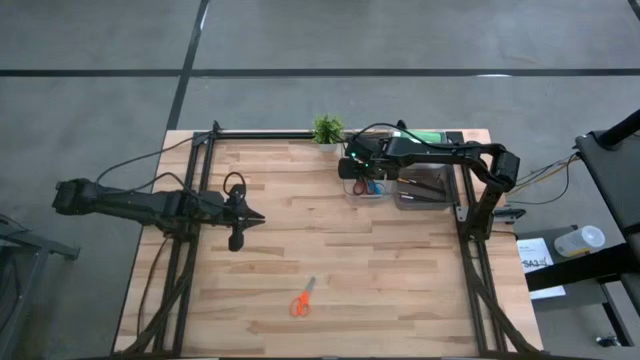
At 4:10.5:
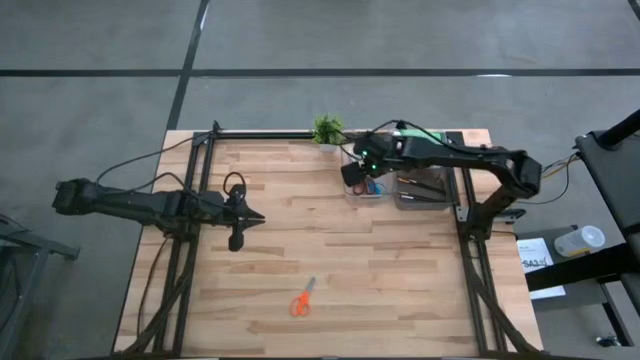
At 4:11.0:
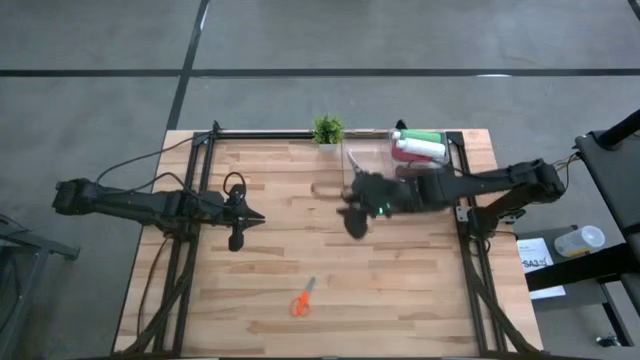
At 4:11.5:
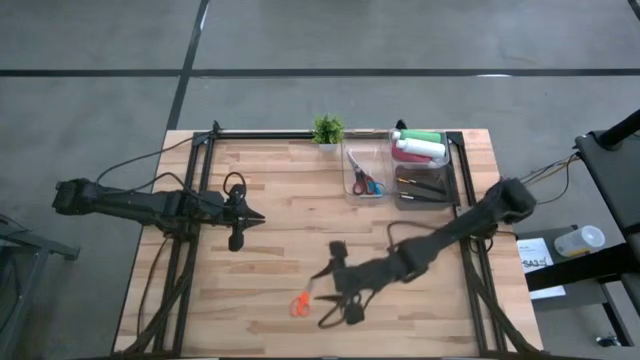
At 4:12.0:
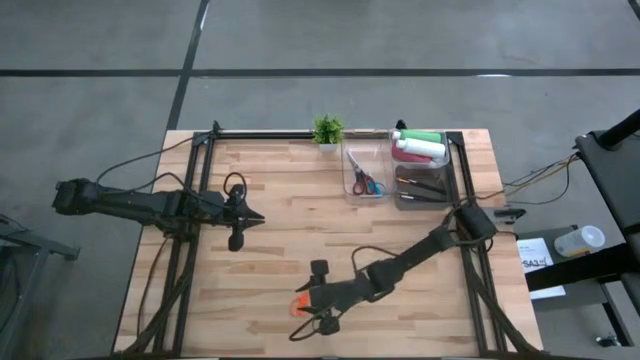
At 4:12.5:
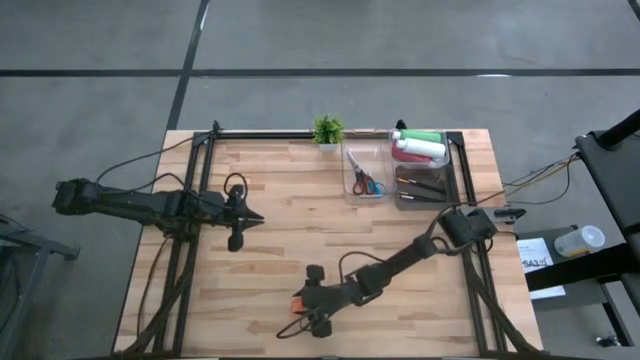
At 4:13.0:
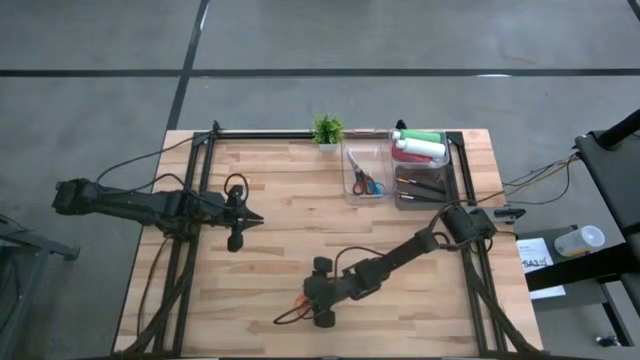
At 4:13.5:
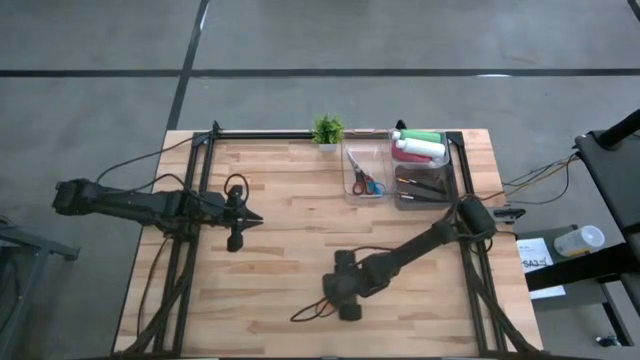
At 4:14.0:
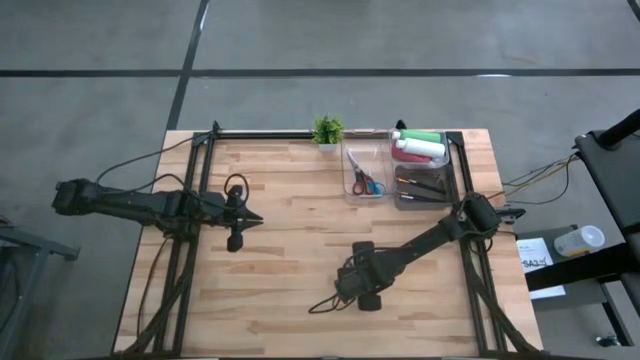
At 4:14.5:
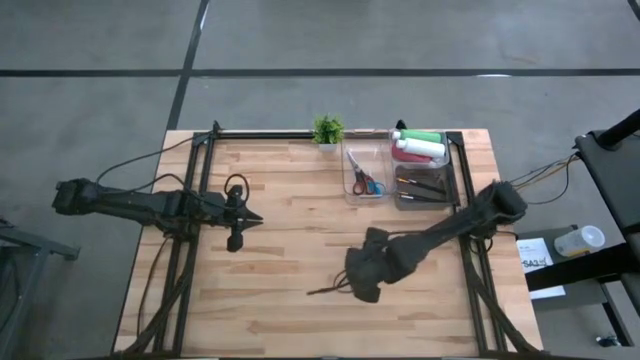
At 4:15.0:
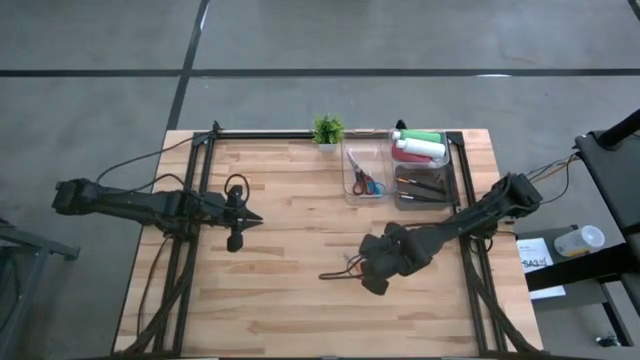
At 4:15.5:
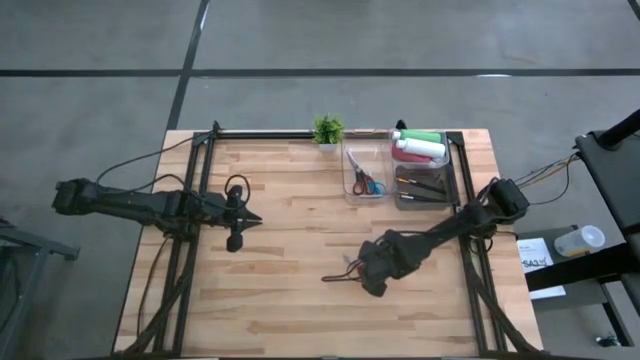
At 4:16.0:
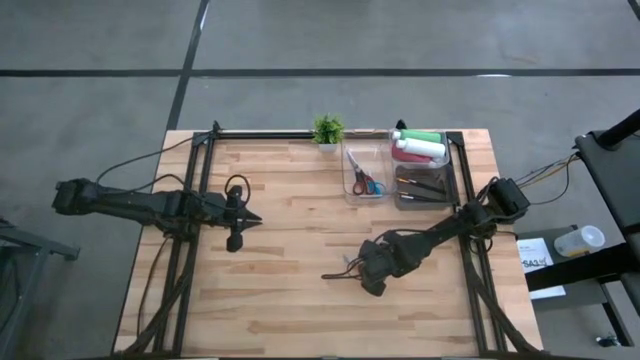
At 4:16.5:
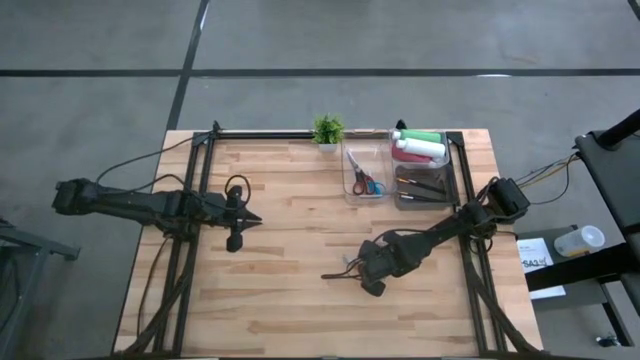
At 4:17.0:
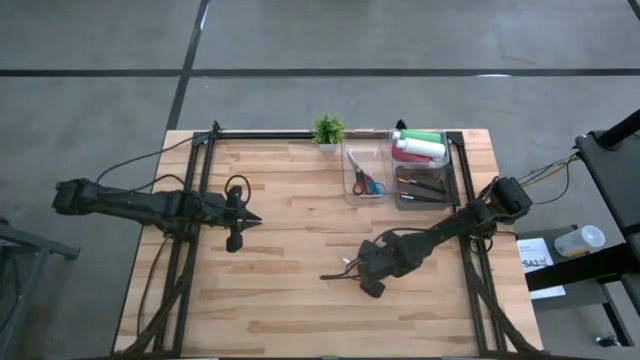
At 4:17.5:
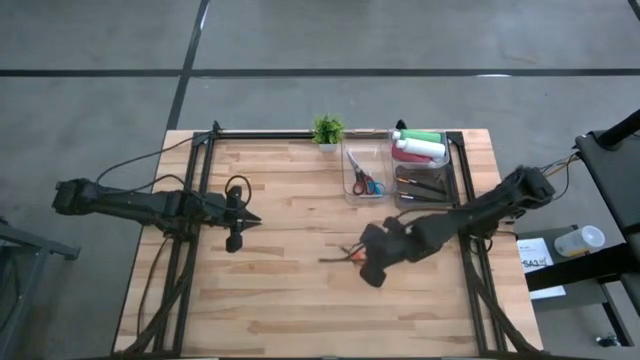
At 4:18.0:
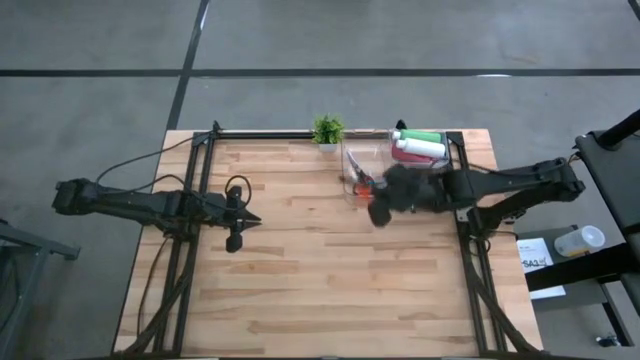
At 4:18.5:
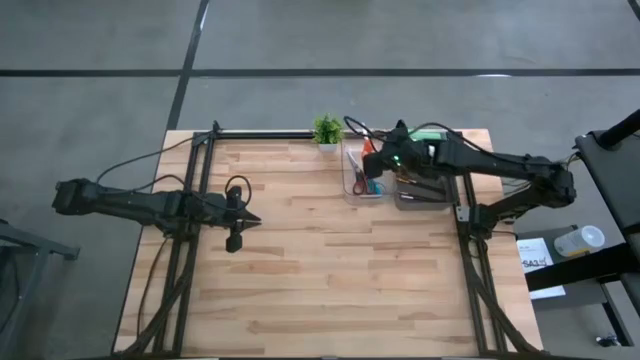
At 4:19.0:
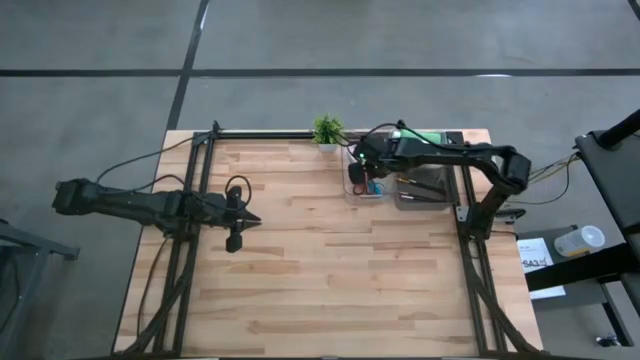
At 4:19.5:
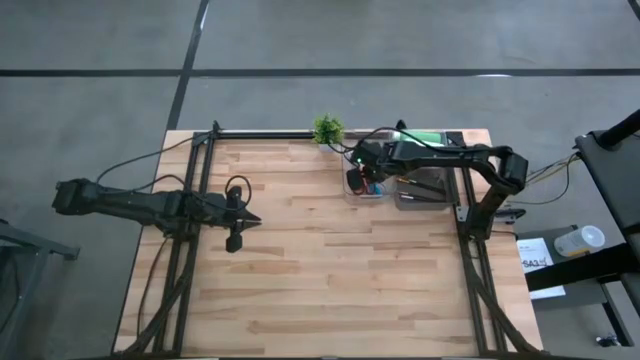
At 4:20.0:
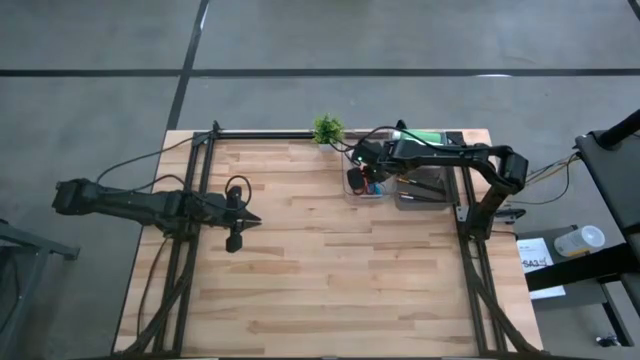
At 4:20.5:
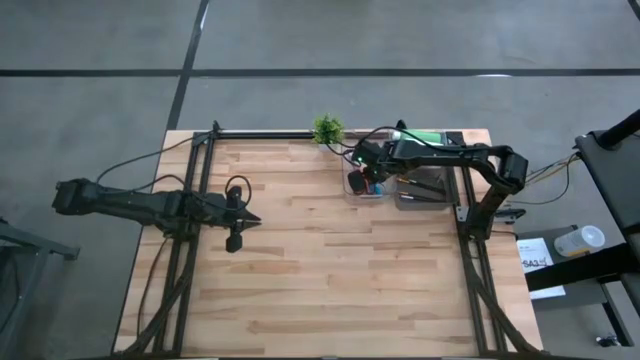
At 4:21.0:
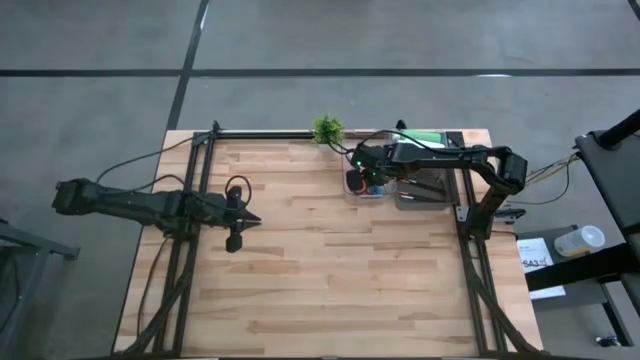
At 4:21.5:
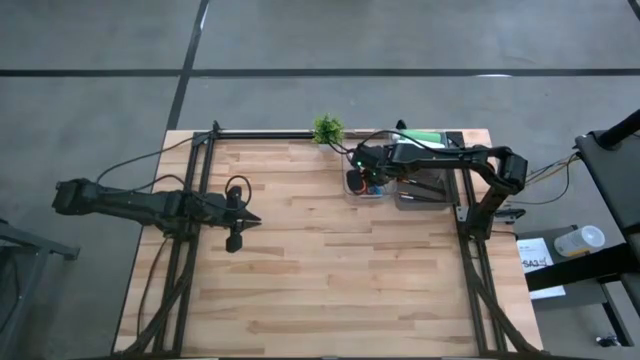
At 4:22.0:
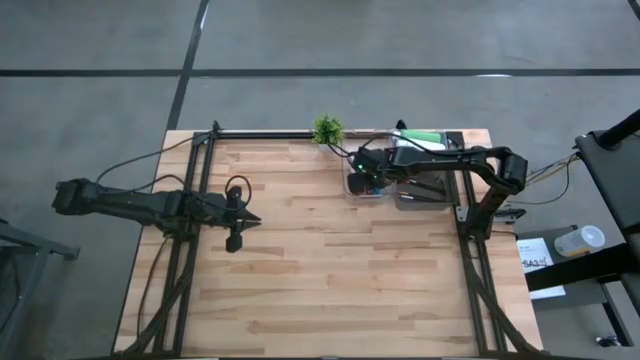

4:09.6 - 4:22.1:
Task: Pick & Place Paint Supplies
Put the orange scissors into the left transparent bin

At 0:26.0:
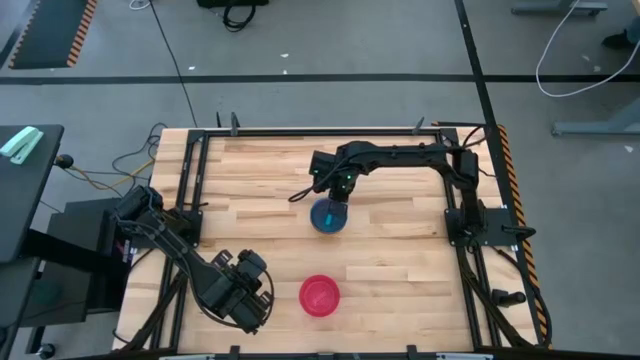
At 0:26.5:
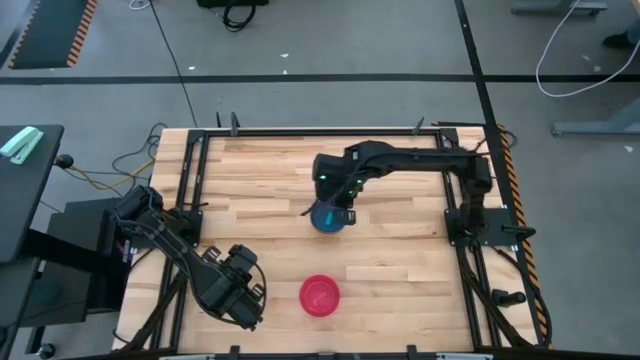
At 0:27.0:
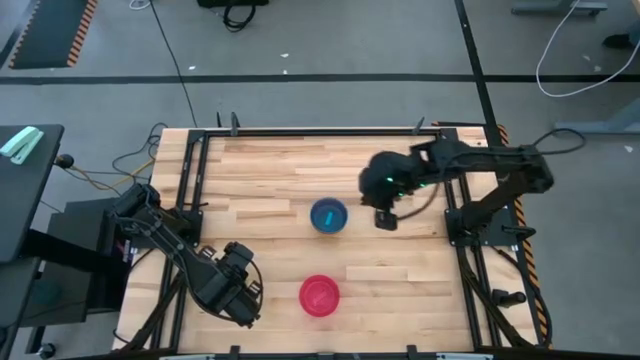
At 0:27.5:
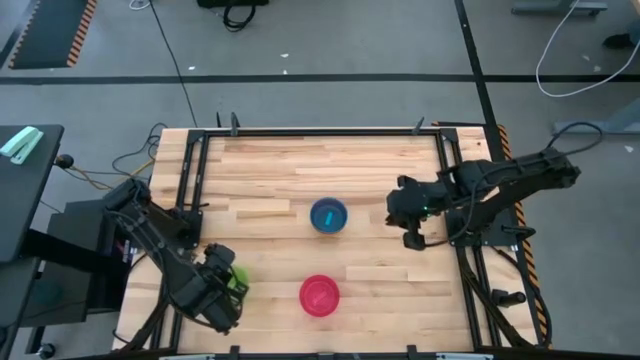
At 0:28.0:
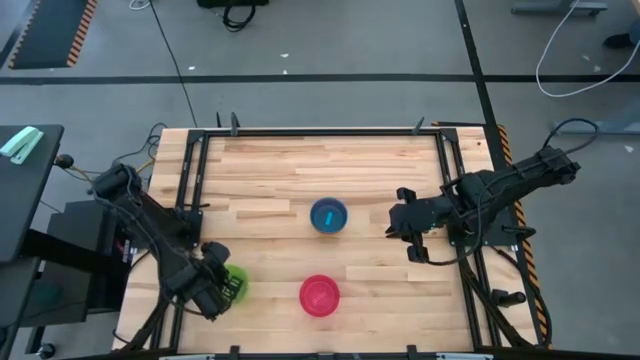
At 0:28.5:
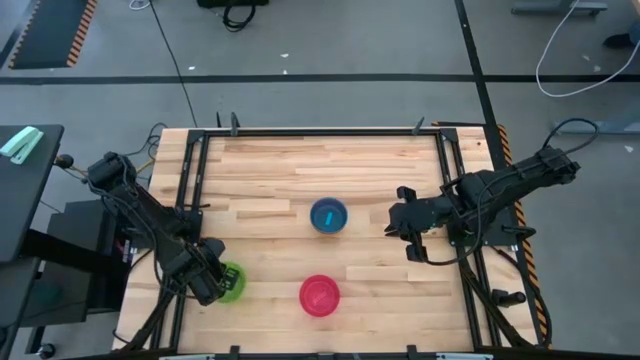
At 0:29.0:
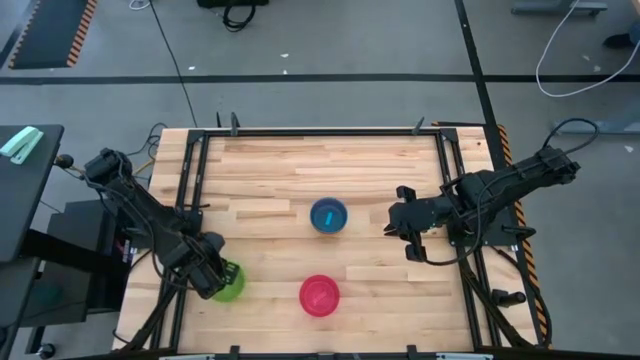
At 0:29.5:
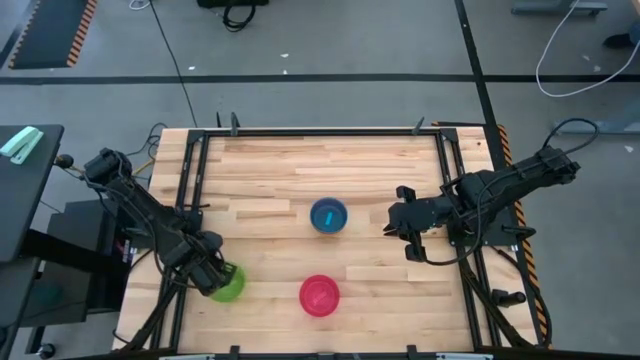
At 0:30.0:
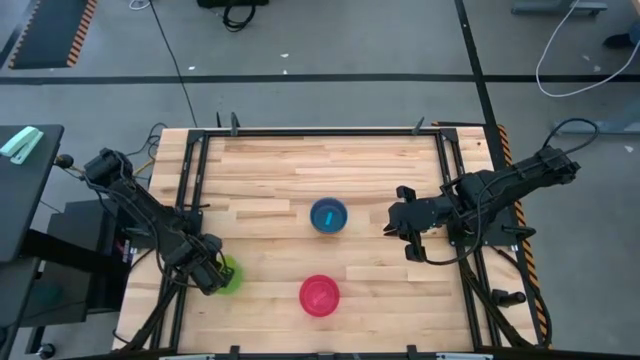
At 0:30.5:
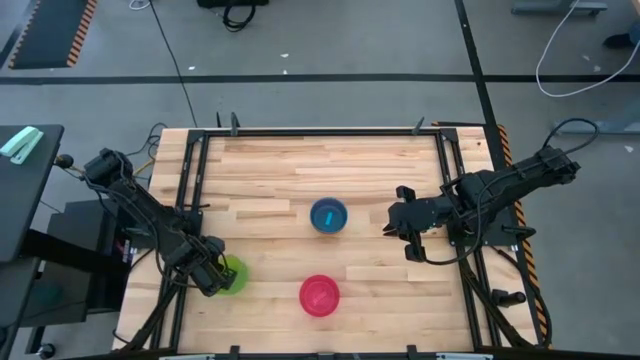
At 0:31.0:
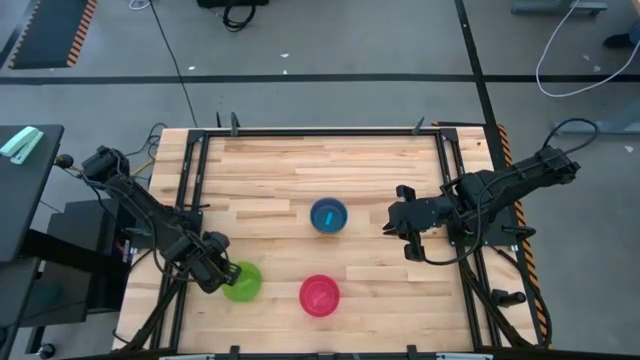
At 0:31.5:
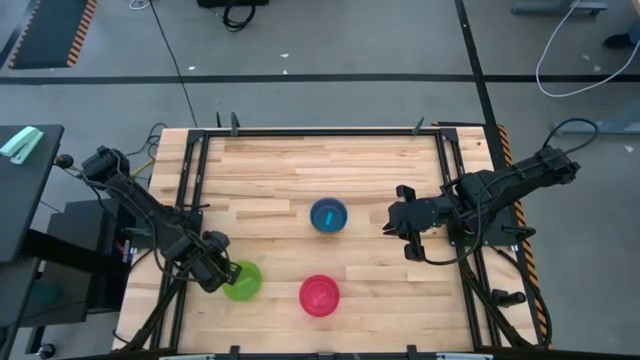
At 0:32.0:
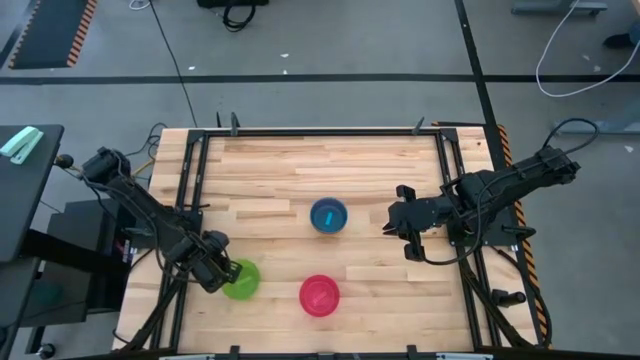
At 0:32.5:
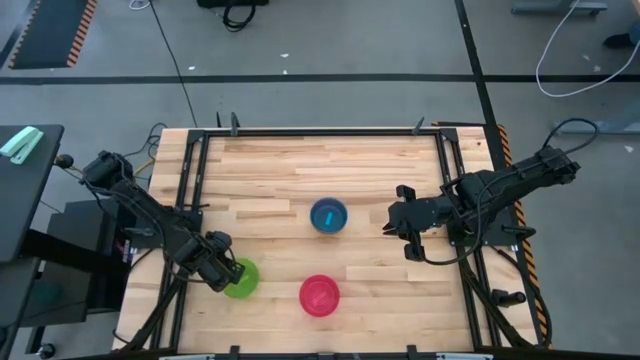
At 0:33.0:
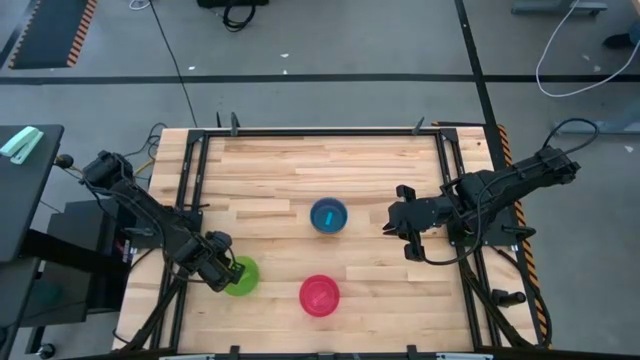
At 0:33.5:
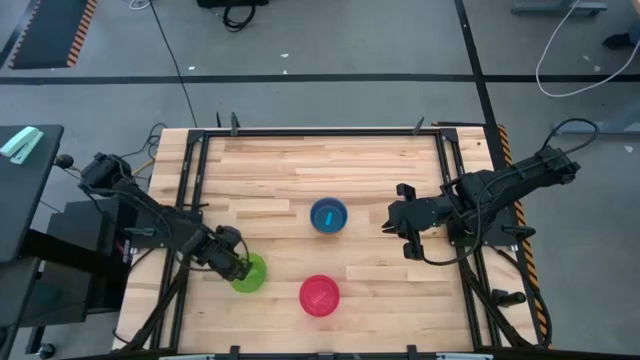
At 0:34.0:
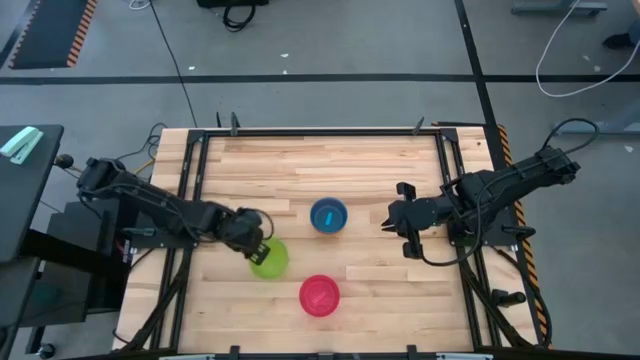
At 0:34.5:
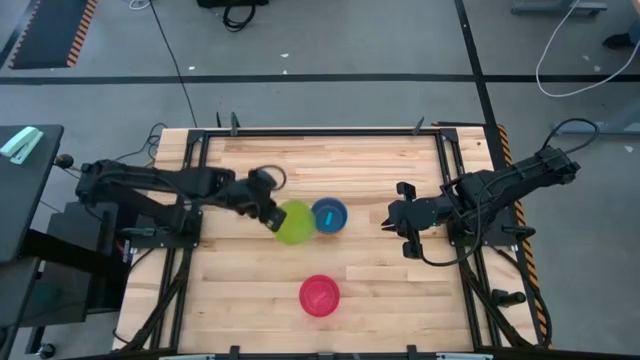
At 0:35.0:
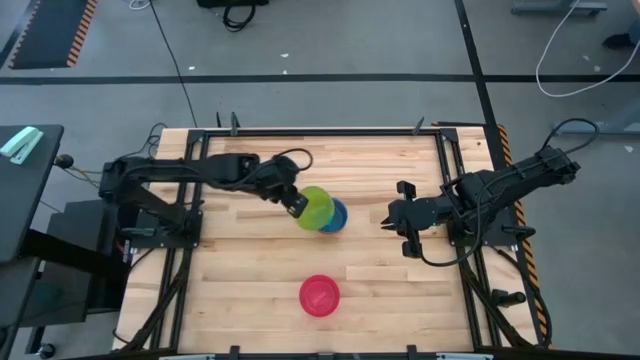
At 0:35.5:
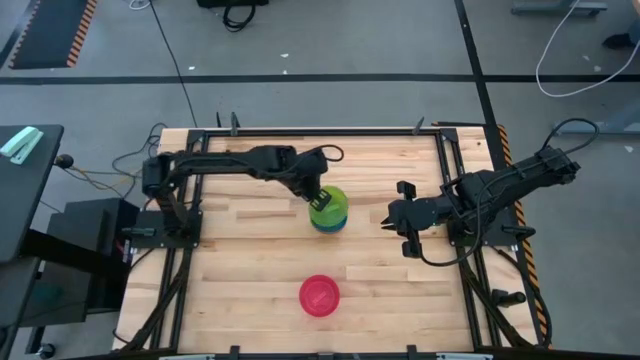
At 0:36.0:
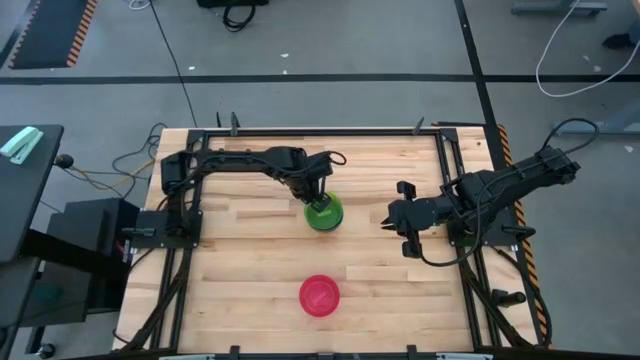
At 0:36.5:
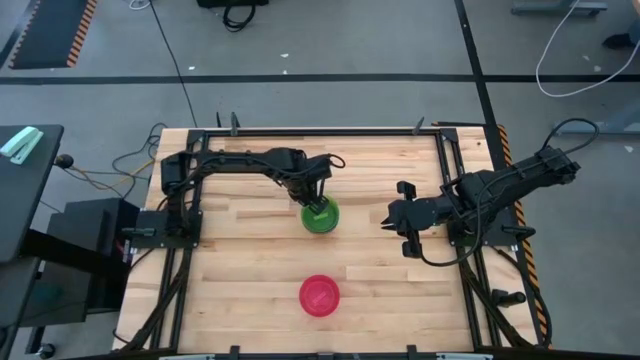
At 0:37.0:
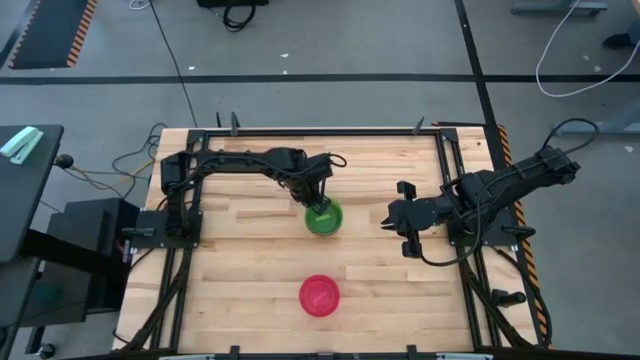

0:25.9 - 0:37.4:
Task: Nest bowls inside each other
Stack the green bowl onto the blue bowl
